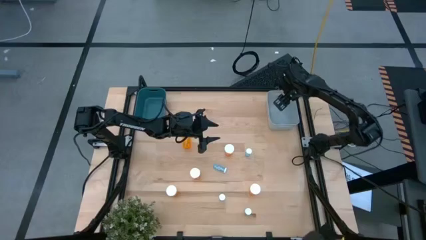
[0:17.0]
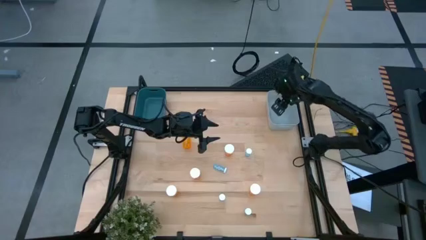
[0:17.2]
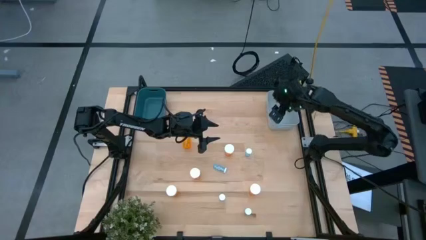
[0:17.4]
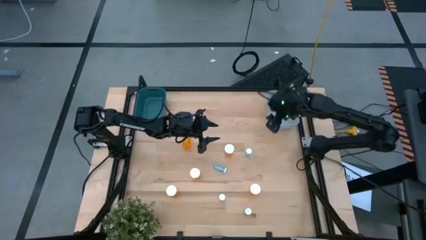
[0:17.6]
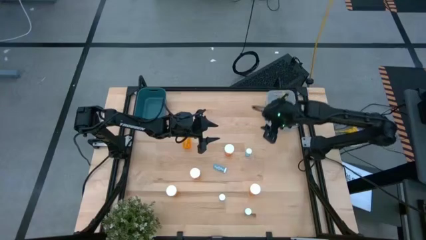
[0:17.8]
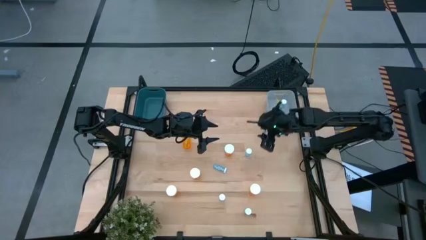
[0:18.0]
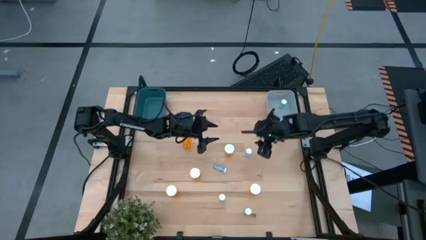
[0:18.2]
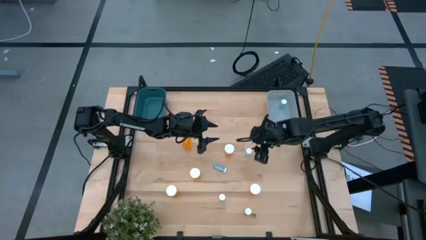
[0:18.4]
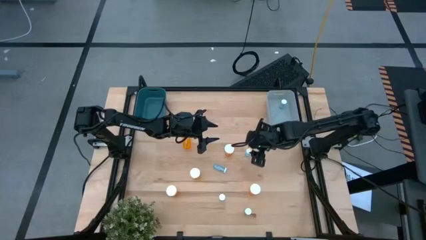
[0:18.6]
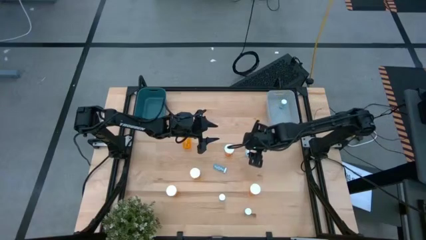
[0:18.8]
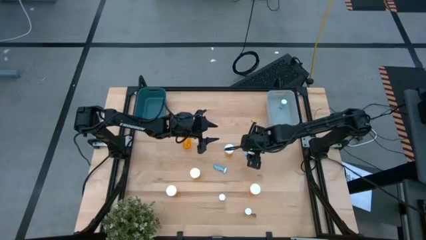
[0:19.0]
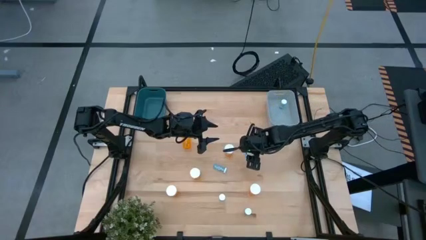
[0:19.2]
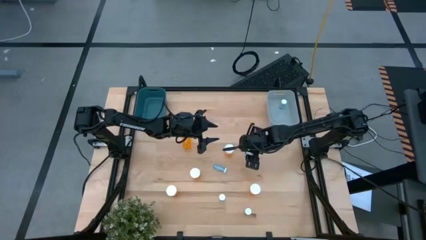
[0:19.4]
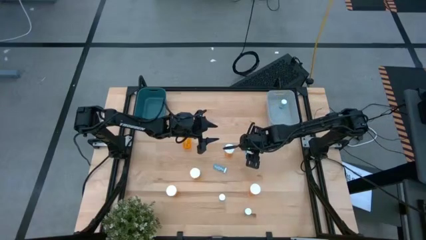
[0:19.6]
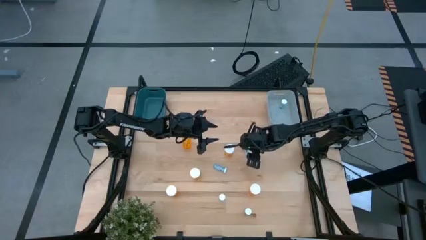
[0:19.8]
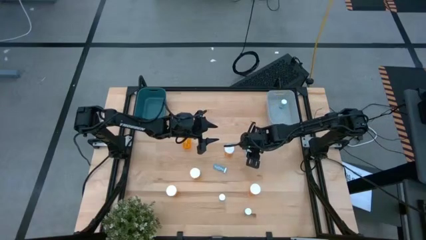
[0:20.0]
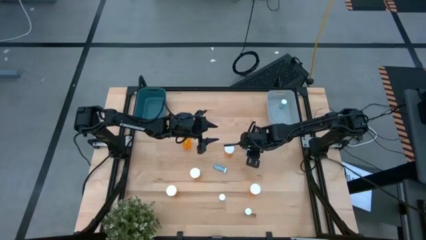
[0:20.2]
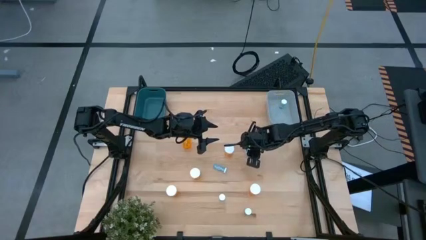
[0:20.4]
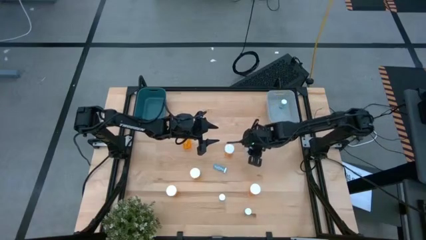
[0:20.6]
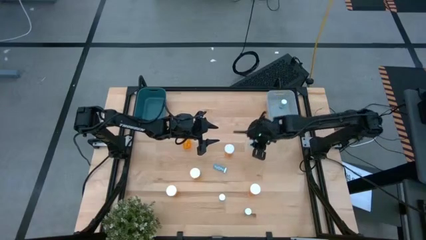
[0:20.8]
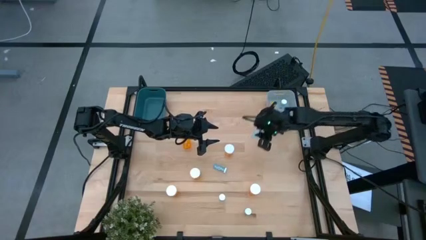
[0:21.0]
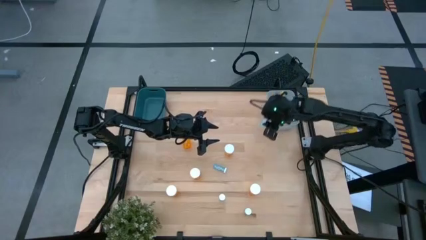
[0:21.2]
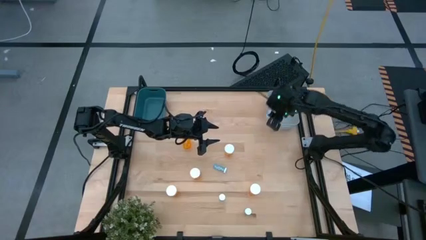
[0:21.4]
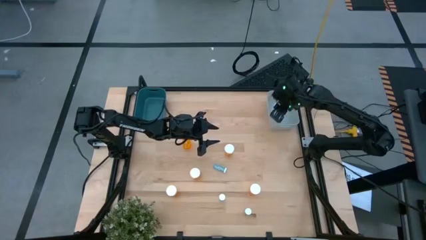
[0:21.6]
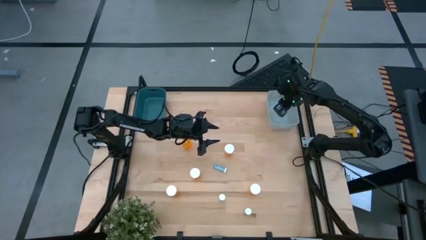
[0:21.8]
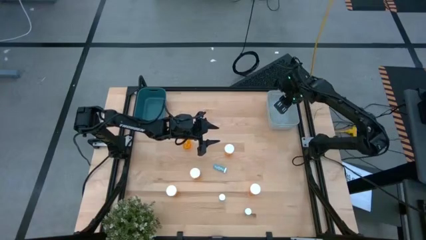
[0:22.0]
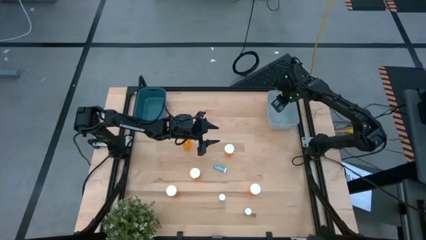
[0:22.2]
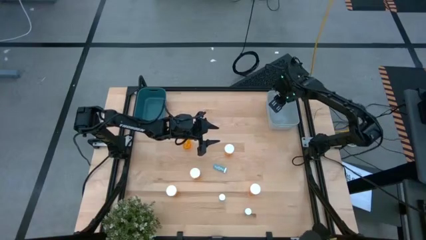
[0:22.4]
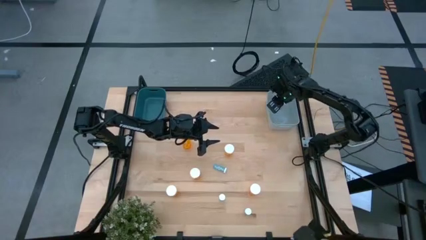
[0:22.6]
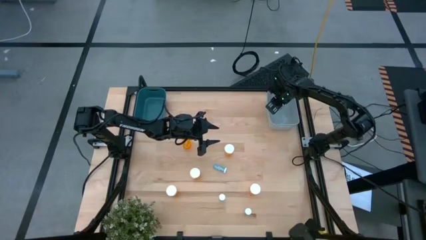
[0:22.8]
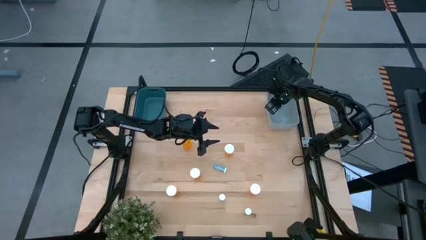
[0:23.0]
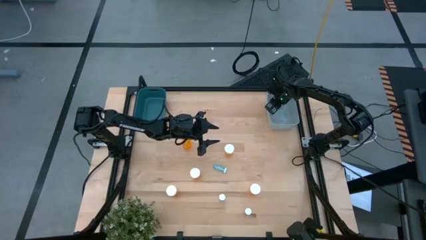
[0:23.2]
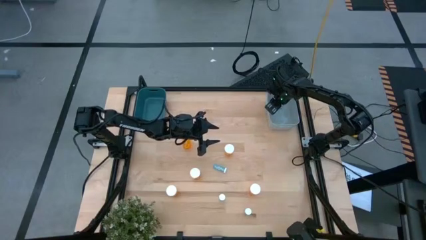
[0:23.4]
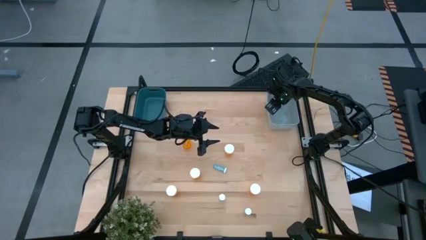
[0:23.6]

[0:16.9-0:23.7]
Task: Pick and place medicine bottles into bin by pill shape (circle, oval)
Put the blue tablet bottle into the gray bin

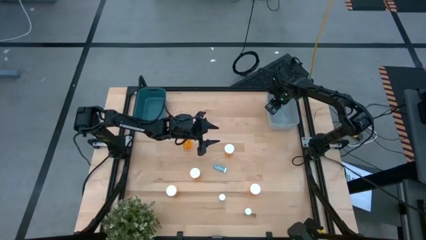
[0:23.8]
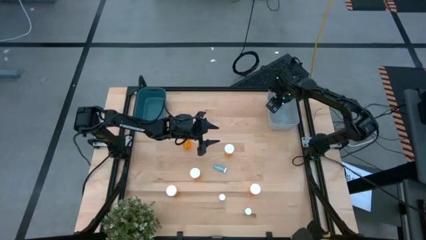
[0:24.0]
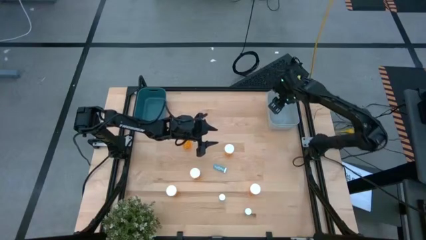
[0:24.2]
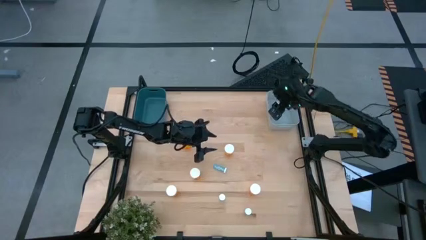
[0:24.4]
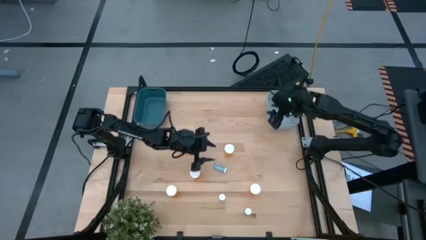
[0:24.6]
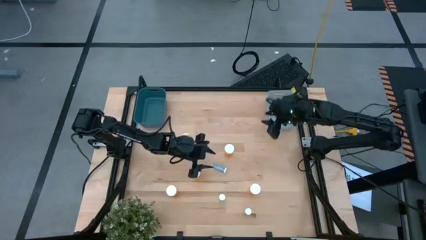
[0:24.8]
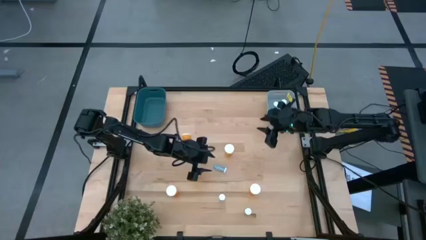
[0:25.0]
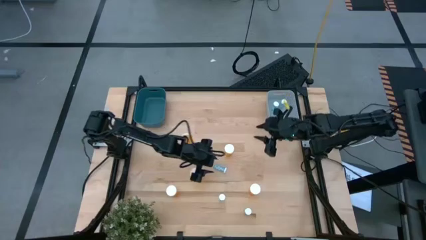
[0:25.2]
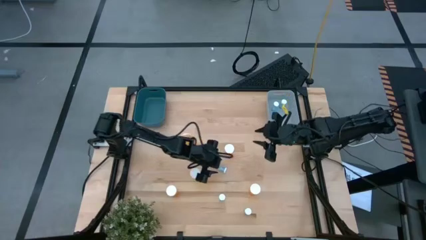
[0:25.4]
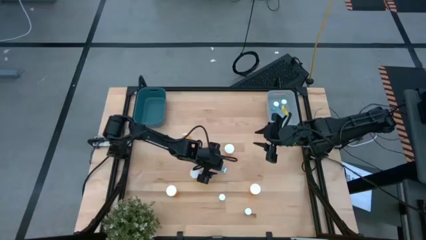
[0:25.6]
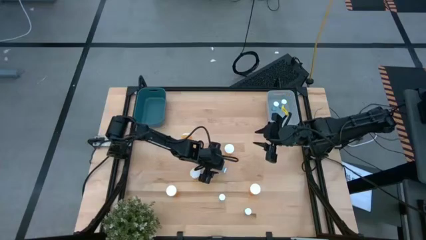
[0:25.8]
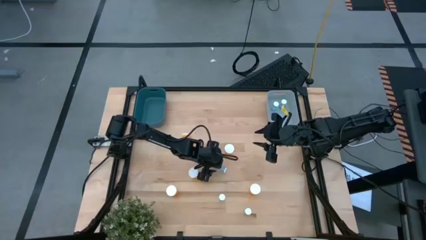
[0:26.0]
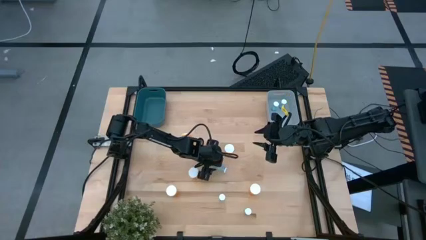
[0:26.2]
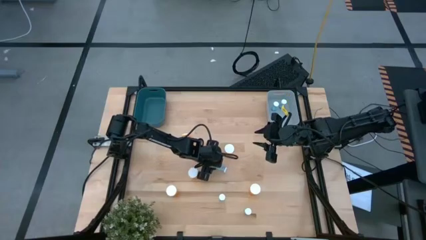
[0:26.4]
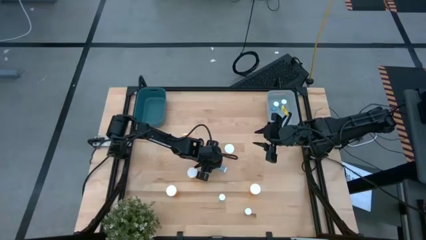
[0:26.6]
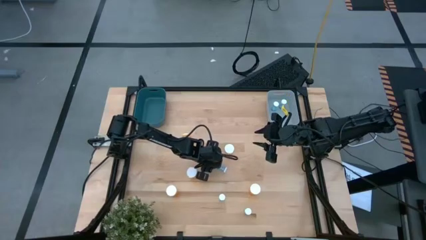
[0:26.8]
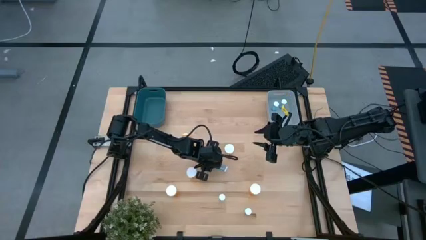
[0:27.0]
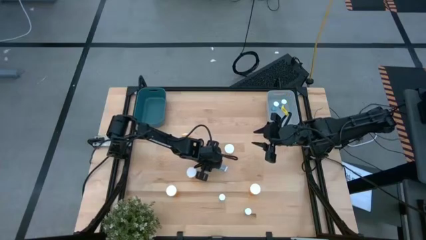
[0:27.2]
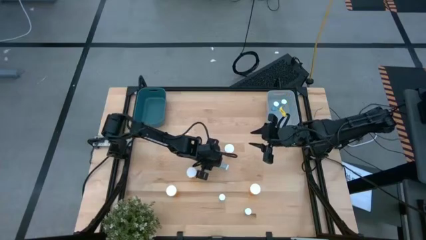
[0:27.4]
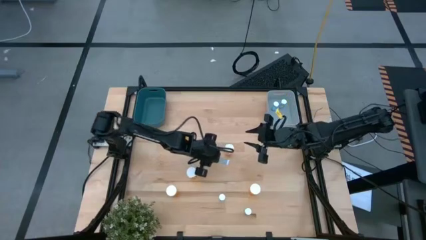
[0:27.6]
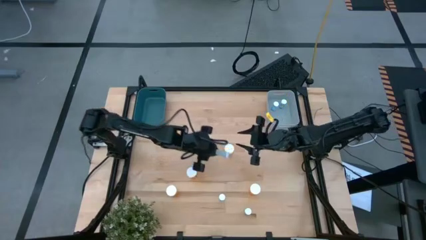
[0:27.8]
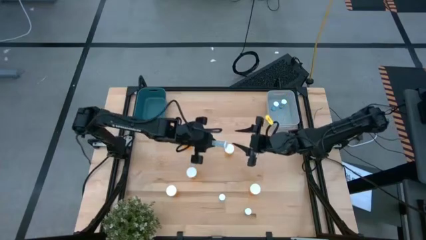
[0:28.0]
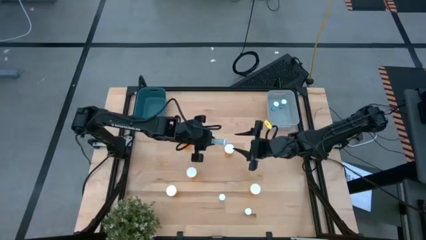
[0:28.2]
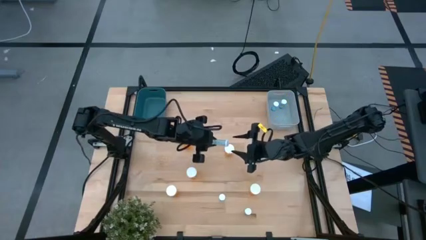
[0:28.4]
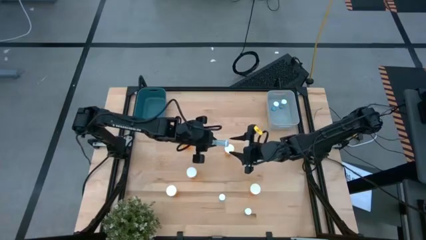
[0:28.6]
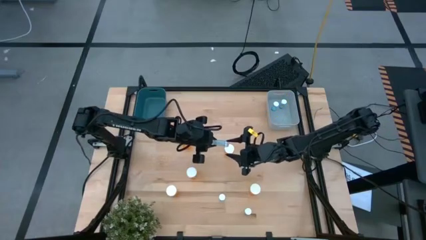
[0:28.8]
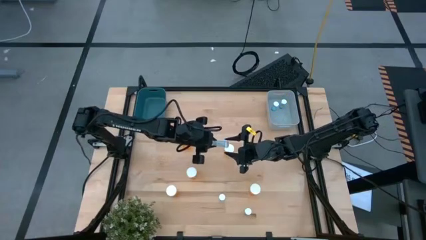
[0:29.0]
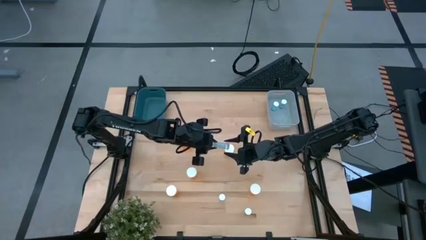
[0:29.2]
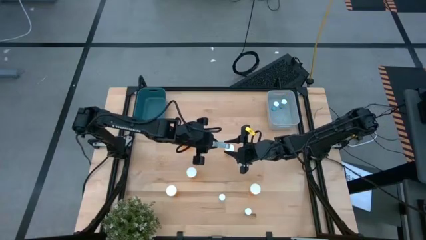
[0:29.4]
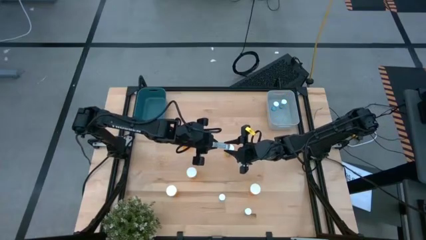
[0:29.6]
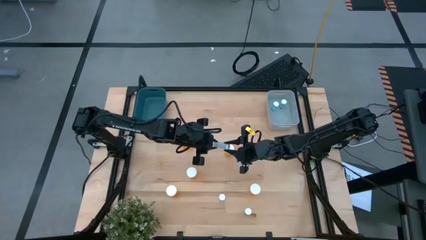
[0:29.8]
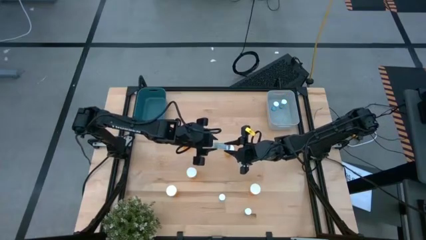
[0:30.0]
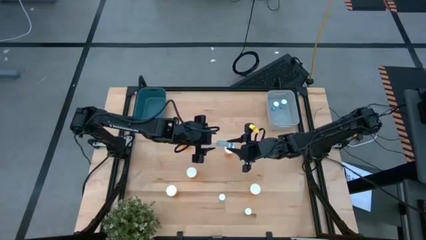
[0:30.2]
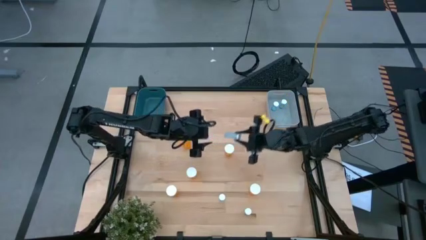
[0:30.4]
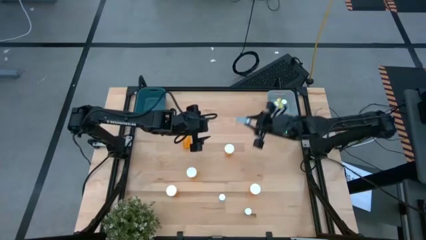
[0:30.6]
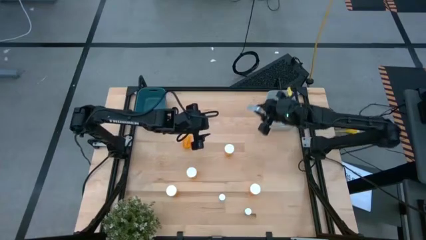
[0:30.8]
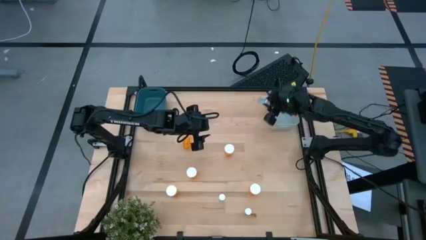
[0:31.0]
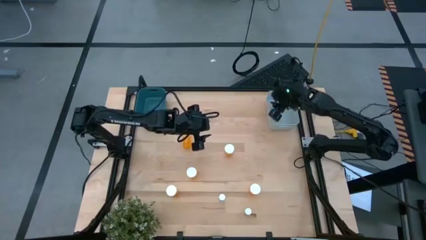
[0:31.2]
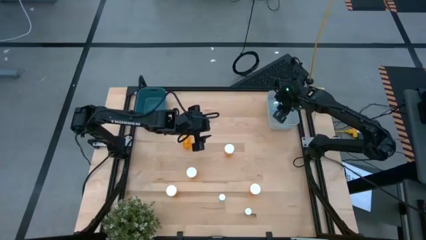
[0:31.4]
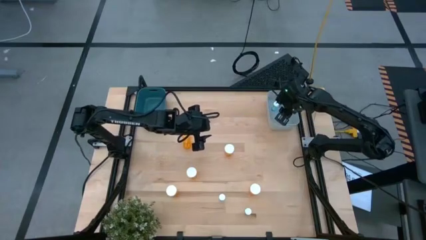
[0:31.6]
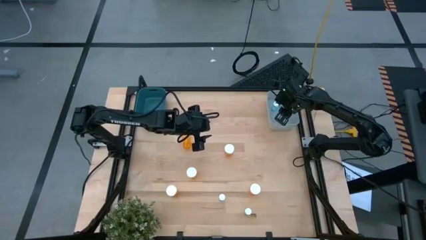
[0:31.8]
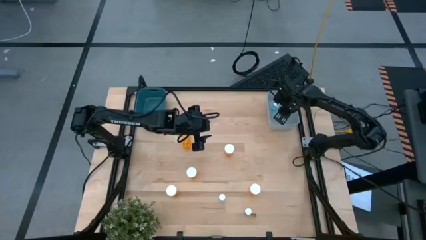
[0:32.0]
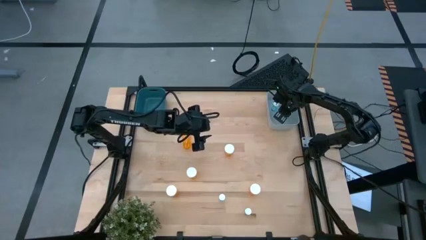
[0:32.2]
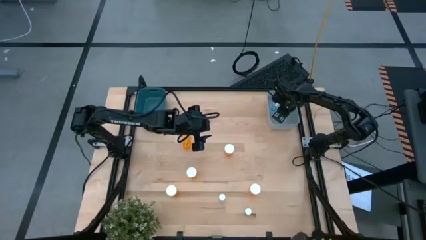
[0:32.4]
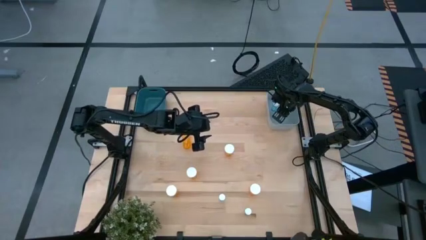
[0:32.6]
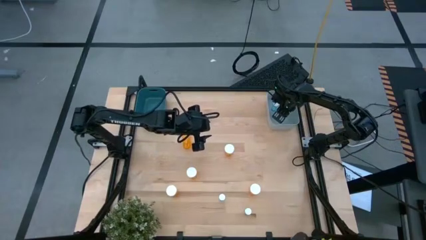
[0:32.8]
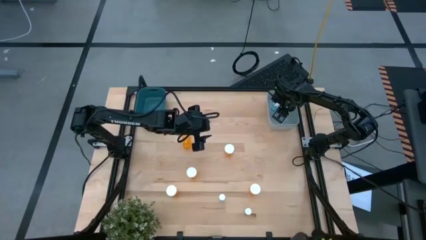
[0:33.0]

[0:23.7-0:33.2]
Put the blue tablet bottle into the gray bin
